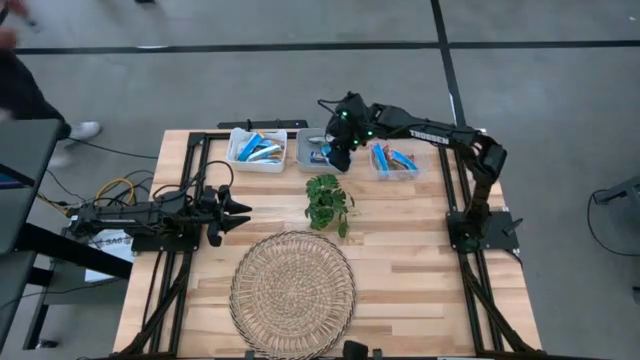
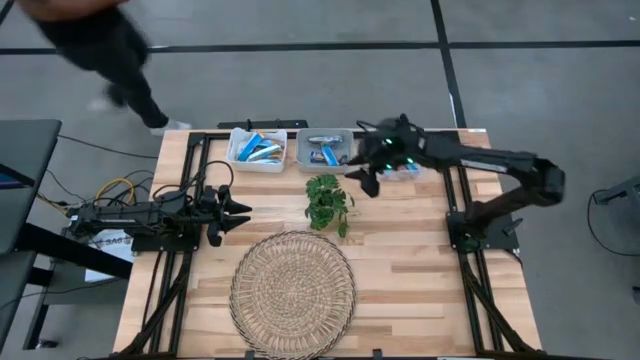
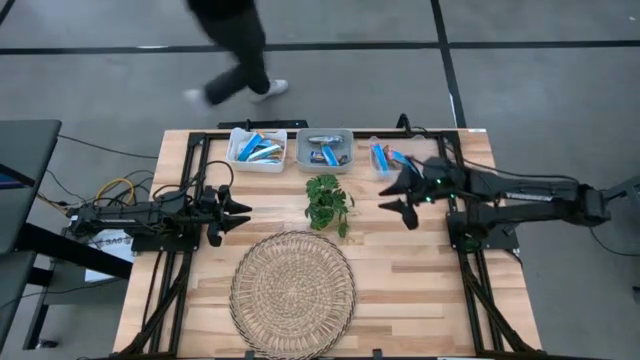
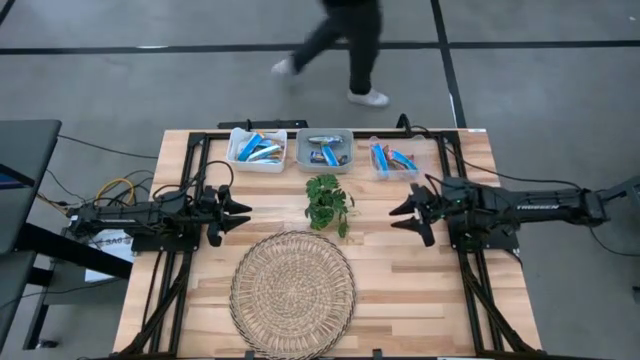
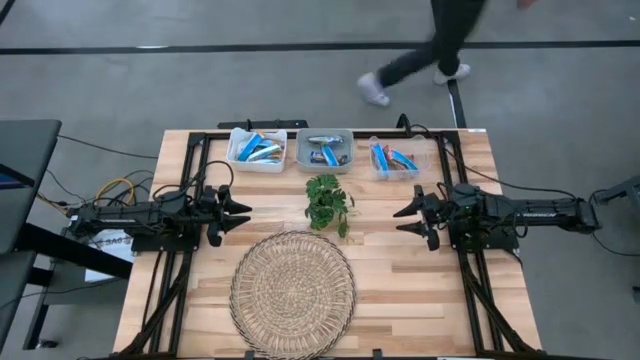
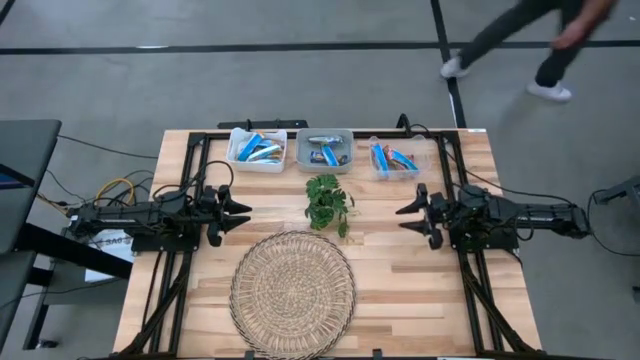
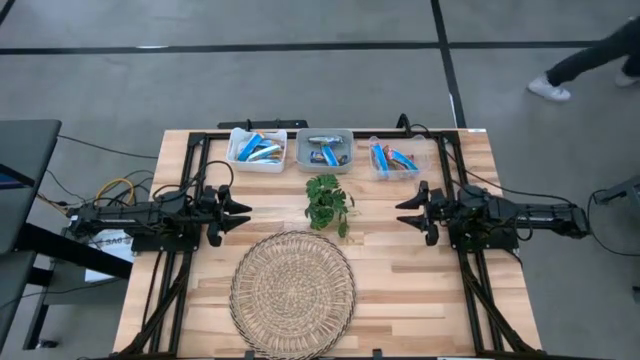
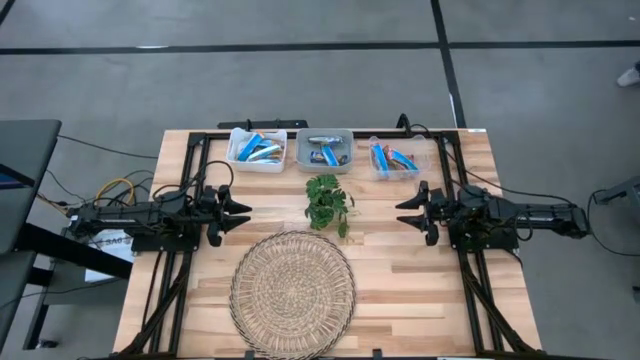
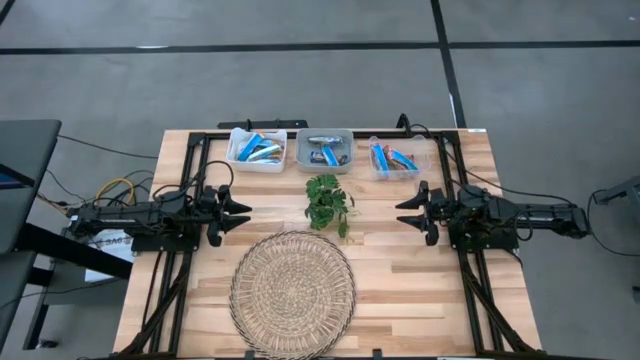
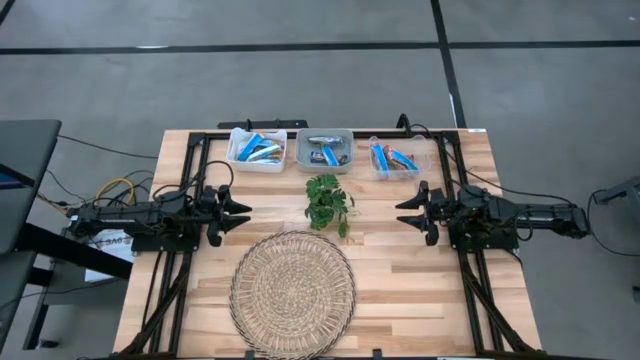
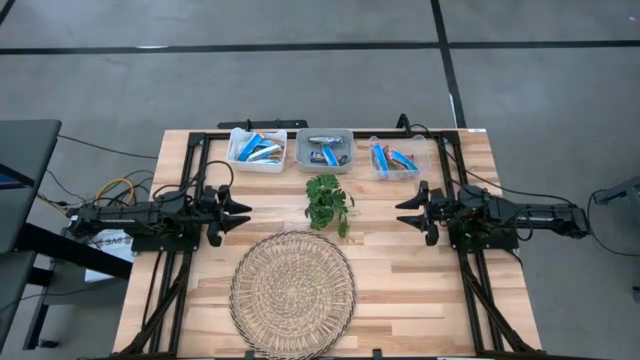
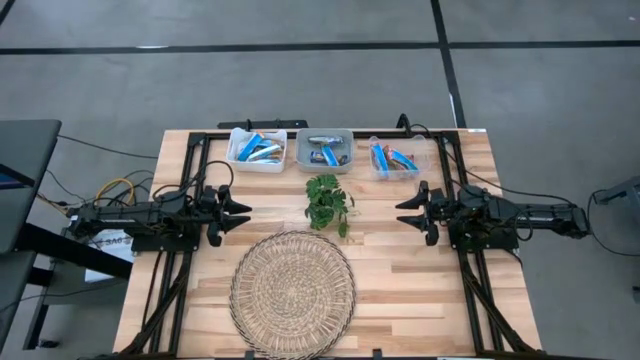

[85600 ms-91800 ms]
Task: Pick and place Granola Bars by type
Return to home position

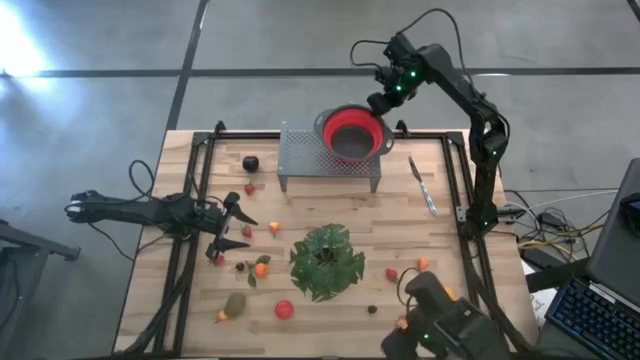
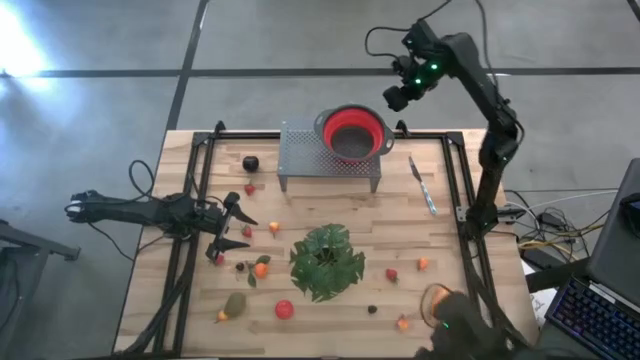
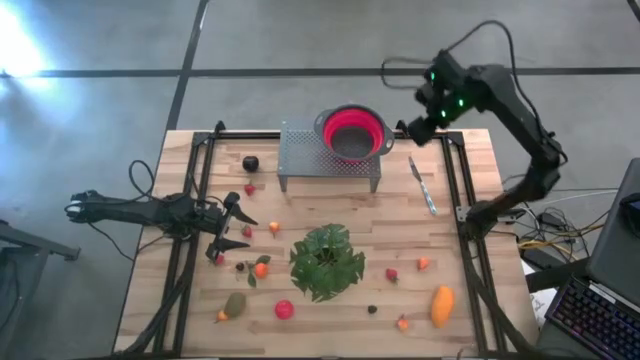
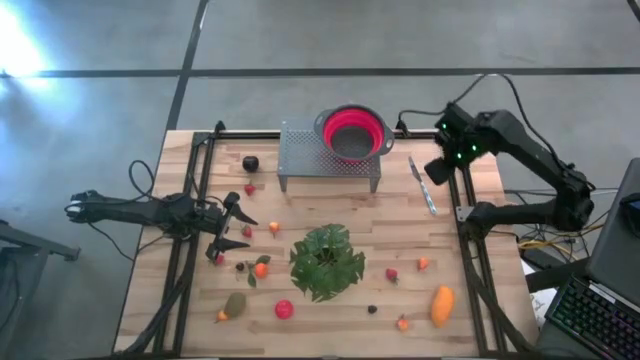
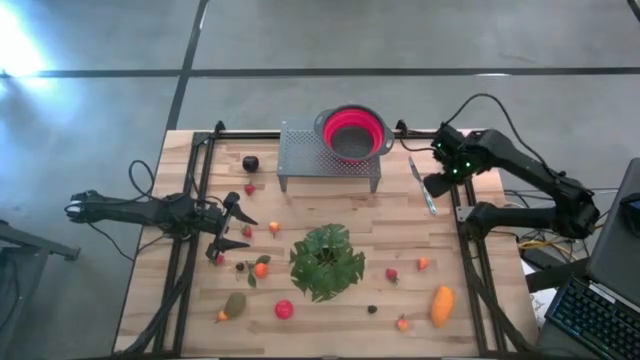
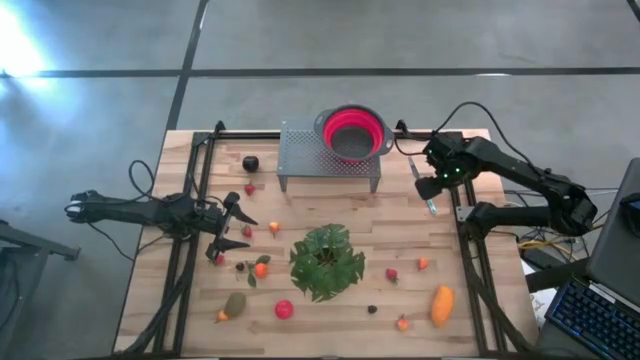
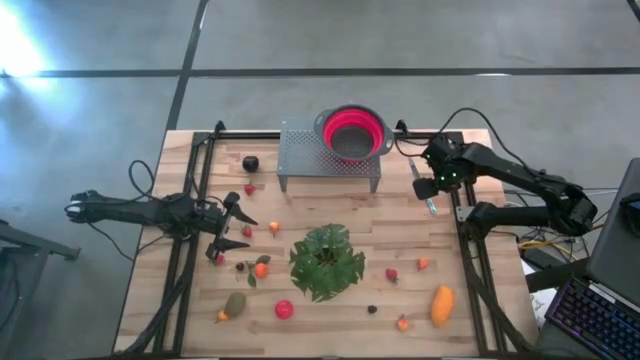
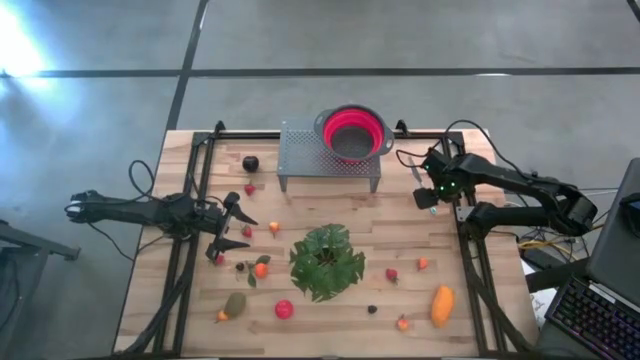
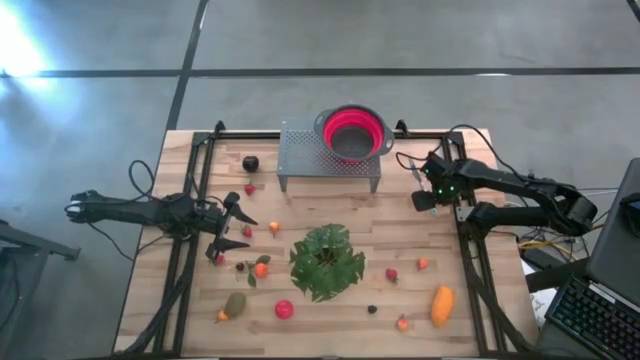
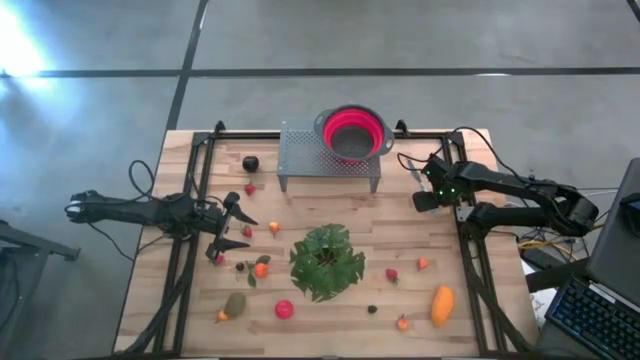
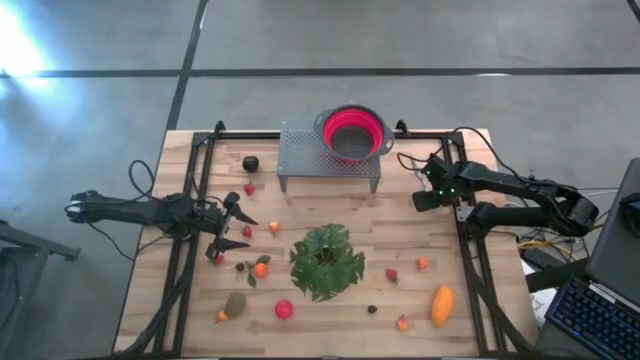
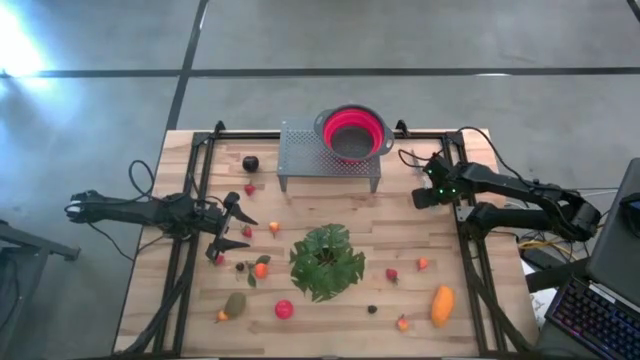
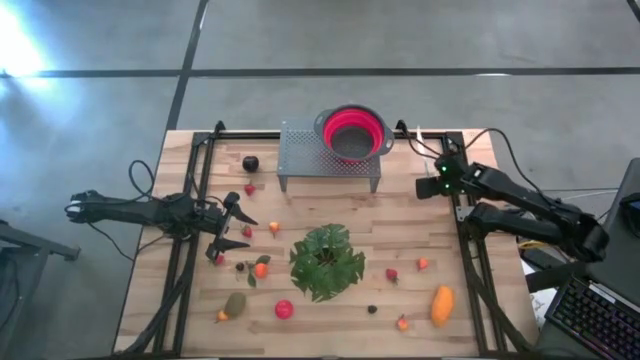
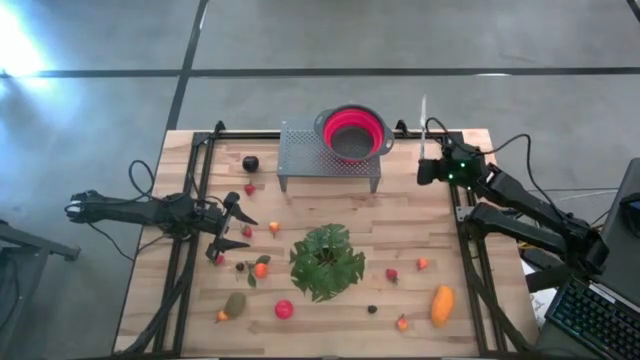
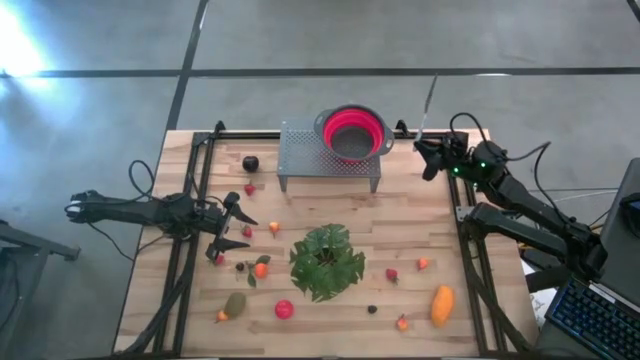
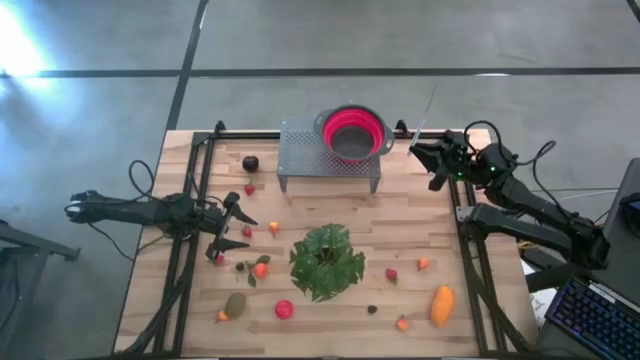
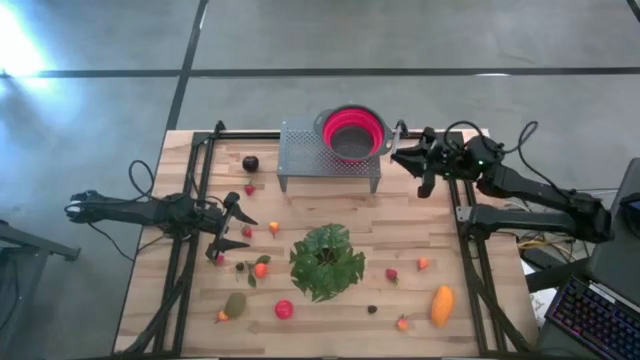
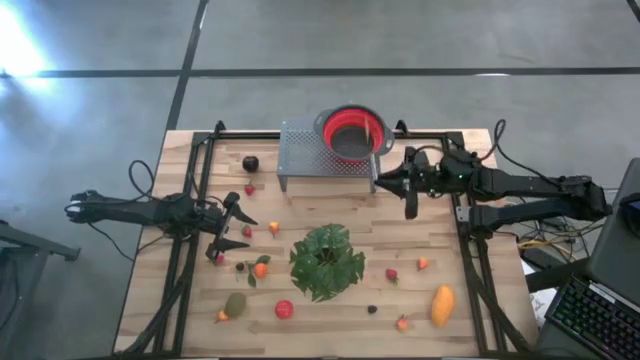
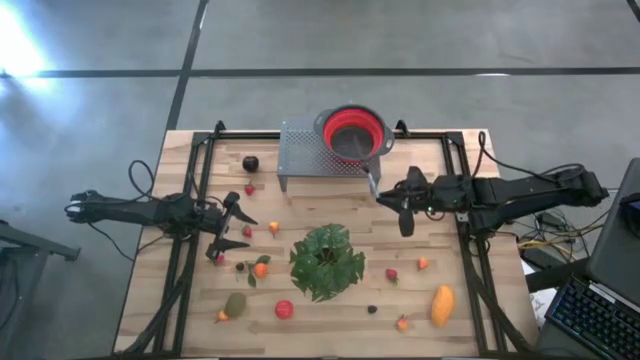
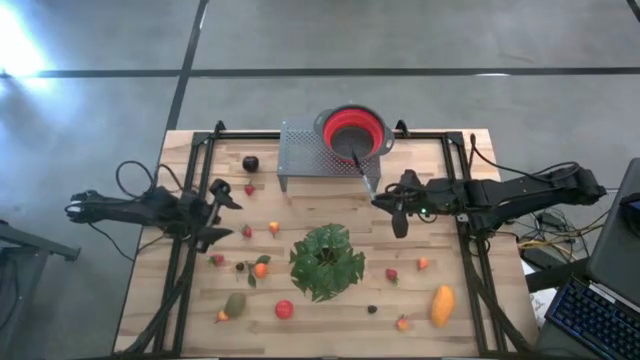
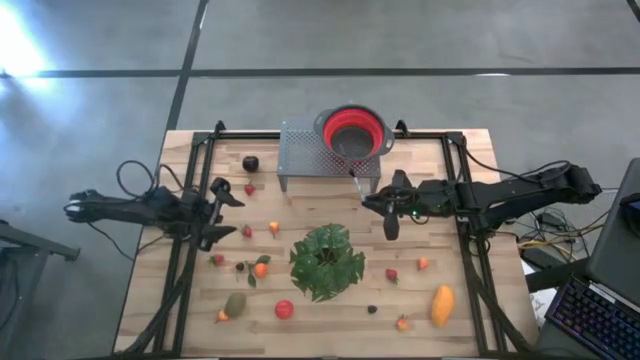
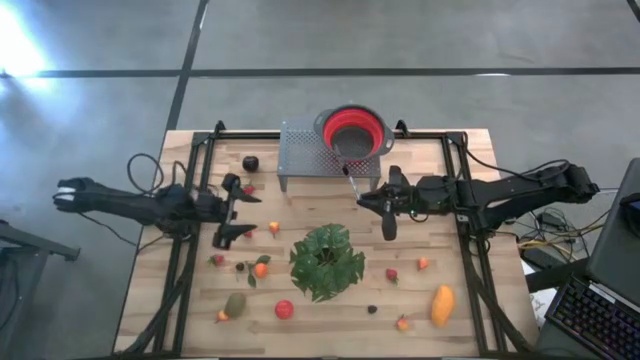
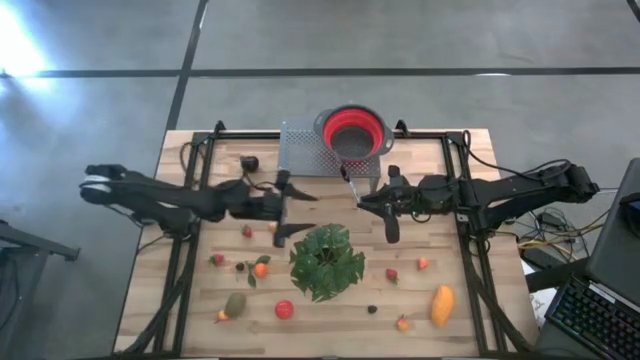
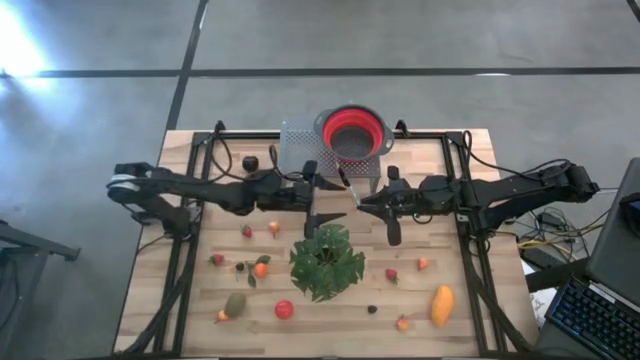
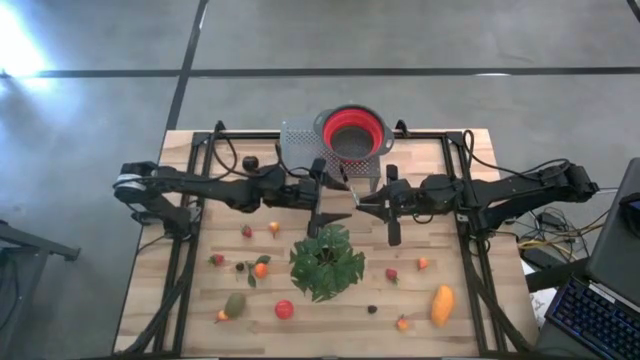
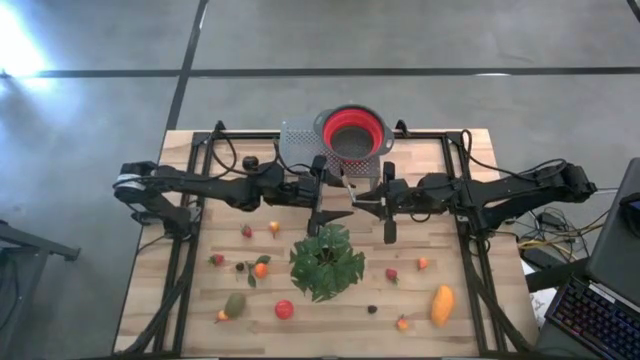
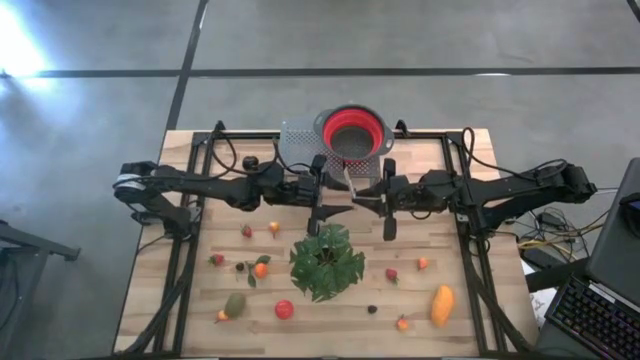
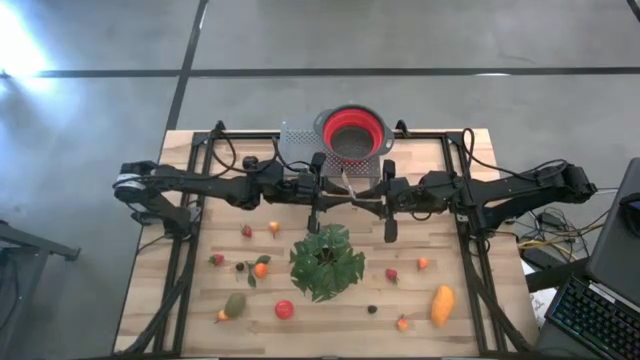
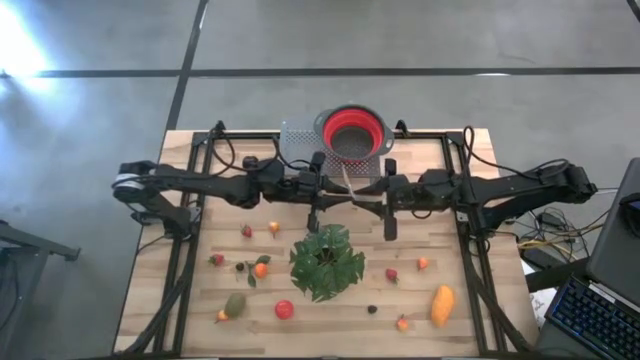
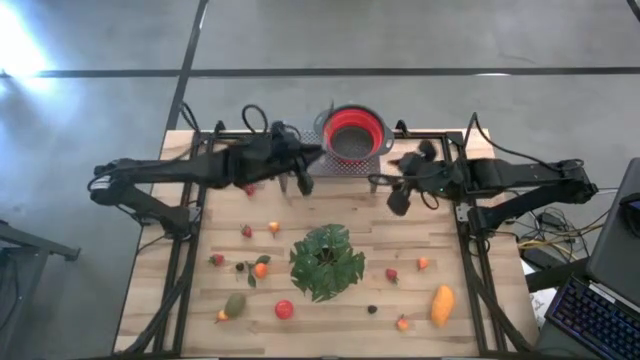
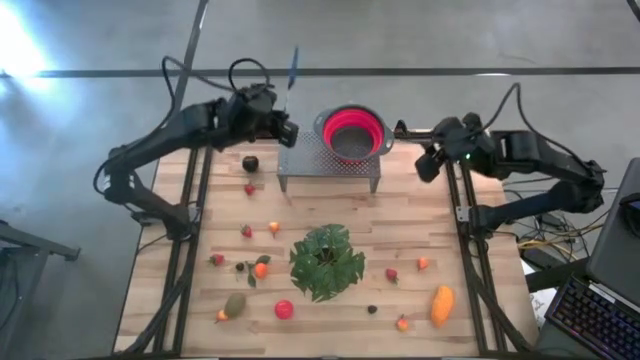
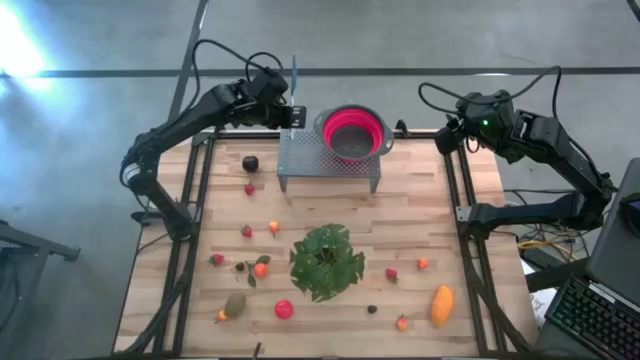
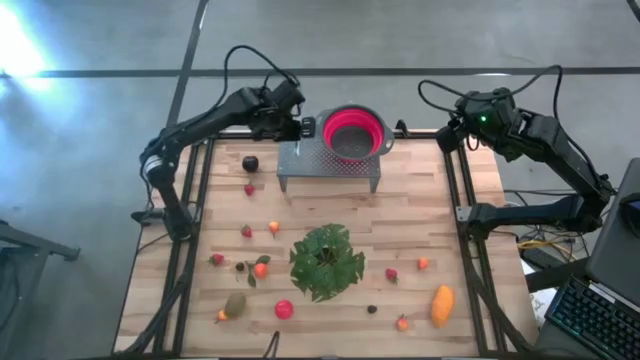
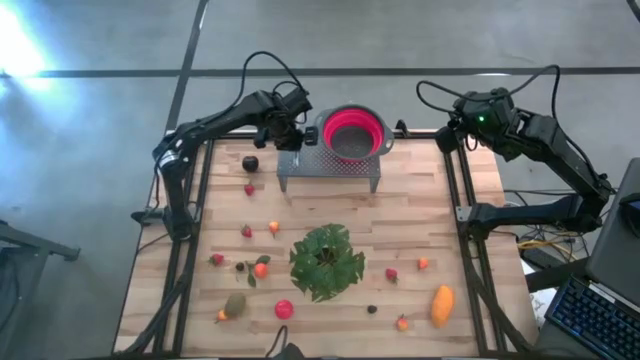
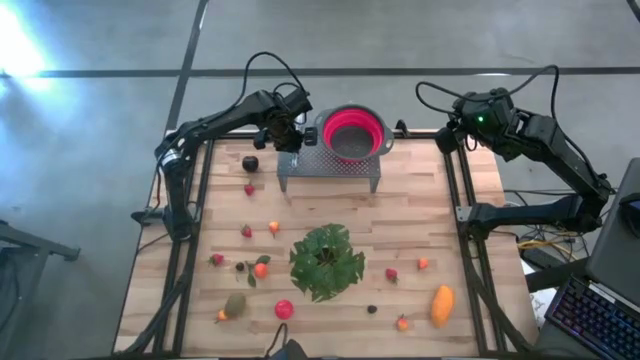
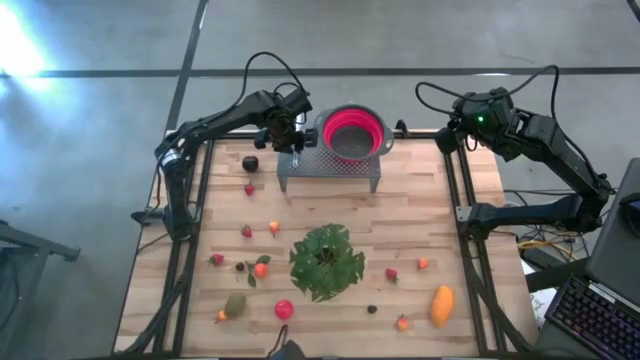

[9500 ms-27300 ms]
Task: Pick & Place Fruit
Put the blue knife on the shelf
